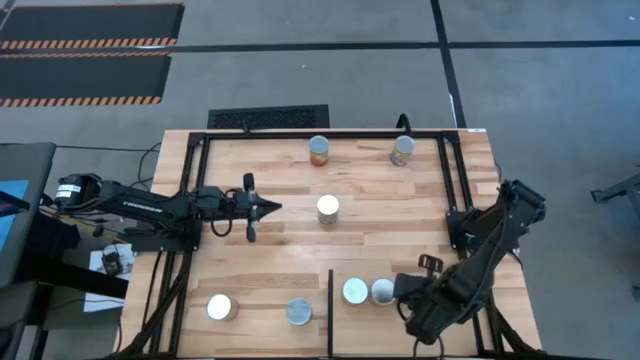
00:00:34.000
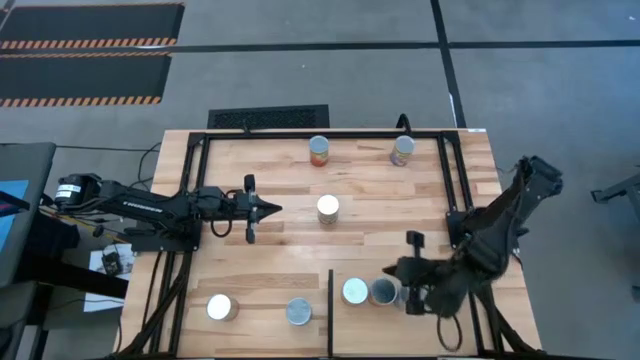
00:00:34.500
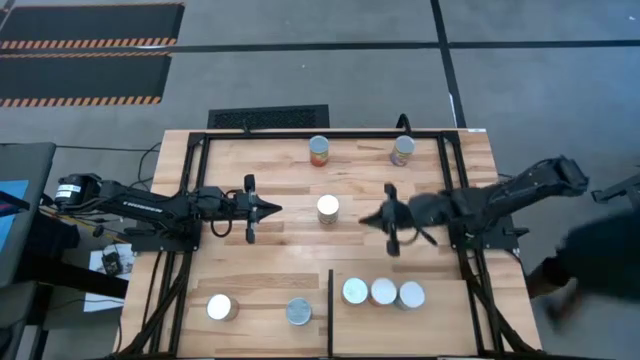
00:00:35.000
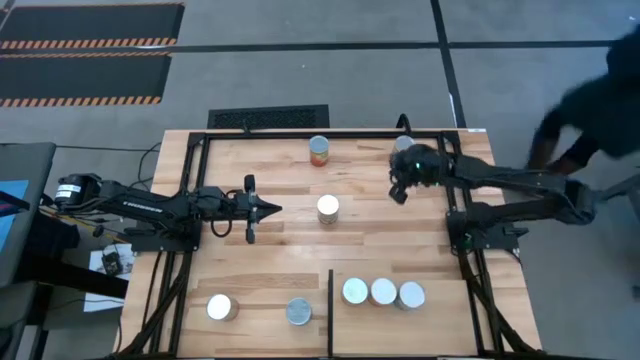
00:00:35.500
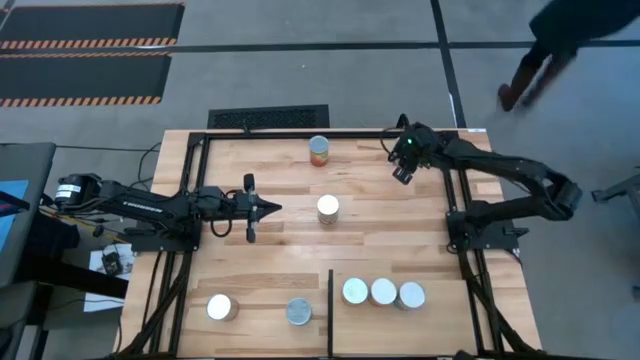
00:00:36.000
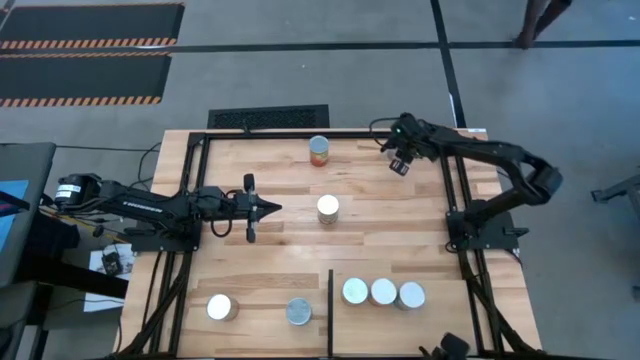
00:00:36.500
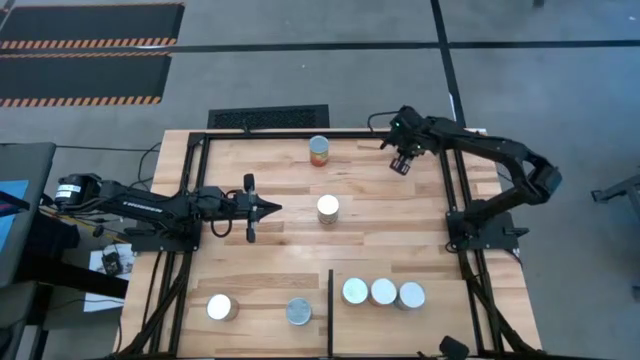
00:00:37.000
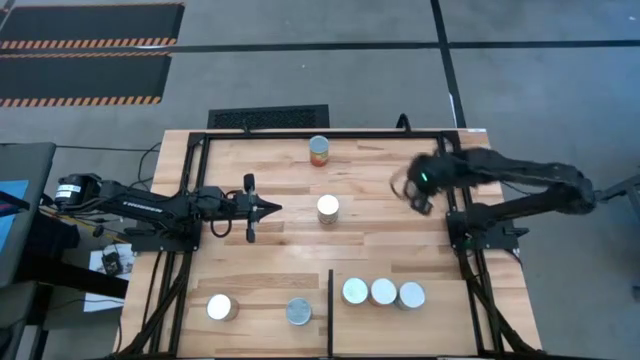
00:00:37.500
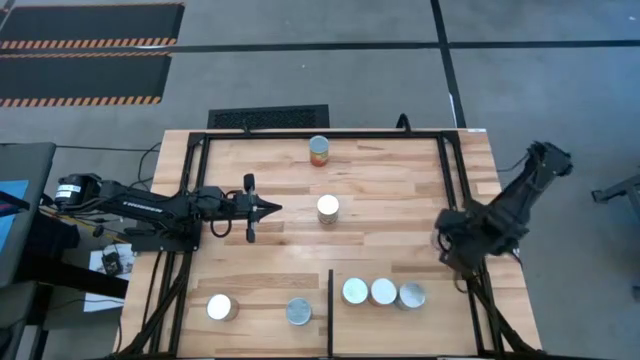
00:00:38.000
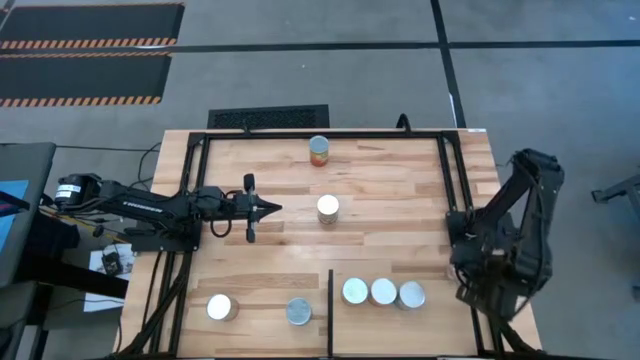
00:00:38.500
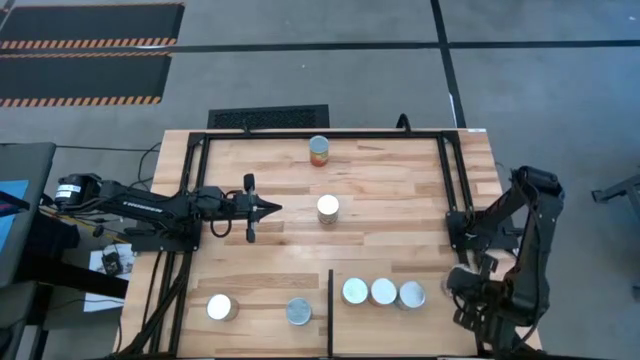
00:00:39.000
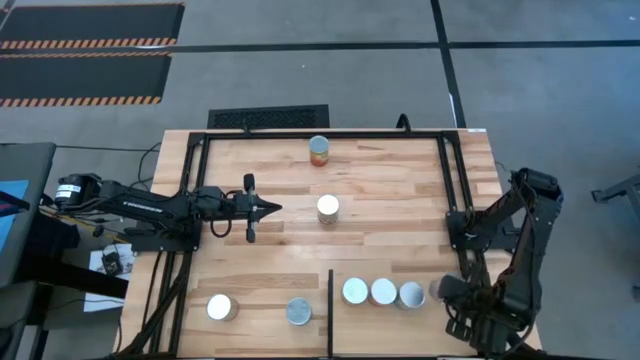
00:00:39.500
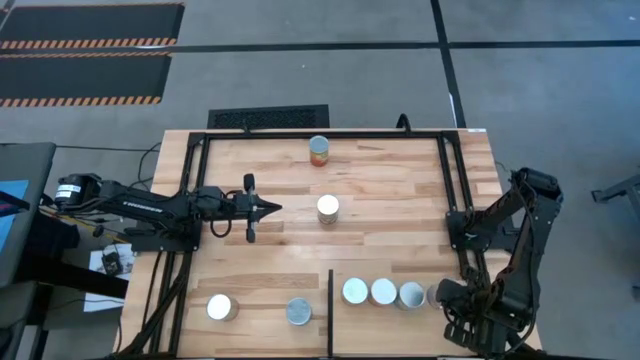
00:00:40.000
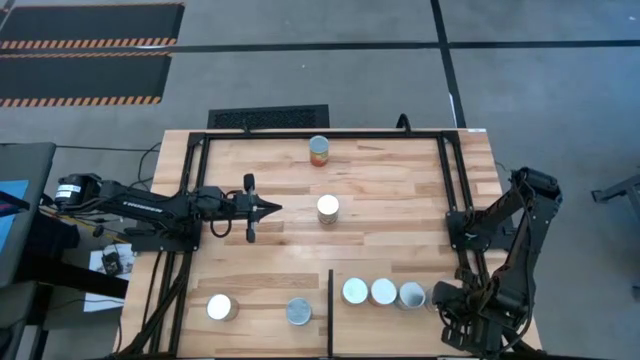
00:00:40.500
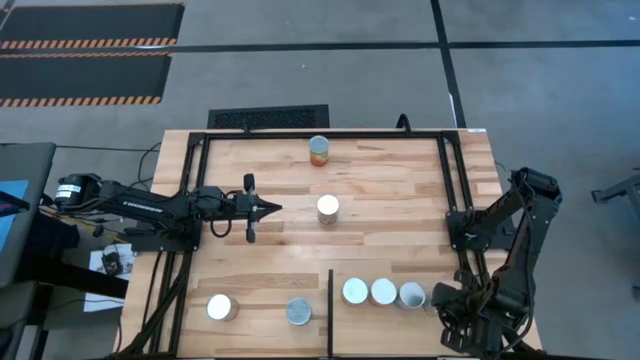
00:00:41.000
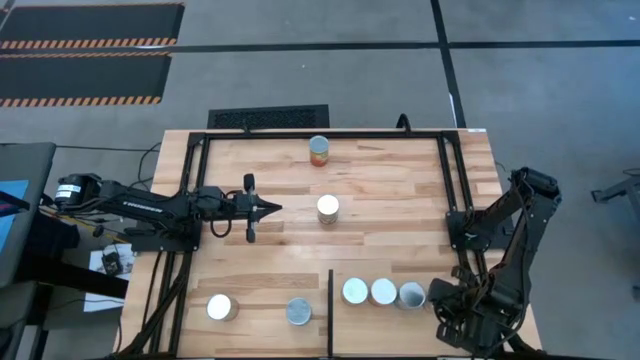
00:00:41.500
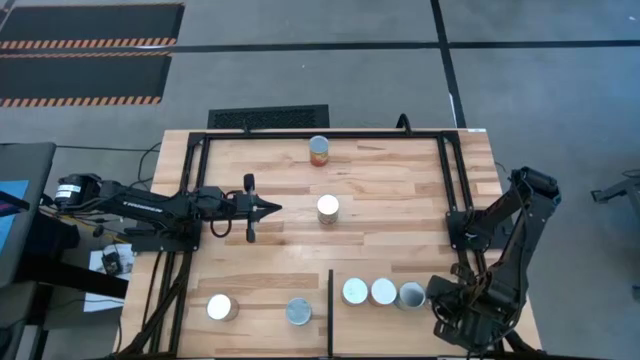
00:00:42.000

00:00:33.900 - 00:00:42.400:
Task: Pick and place cans onto a shelf
Put the top canned peaches on the shelf

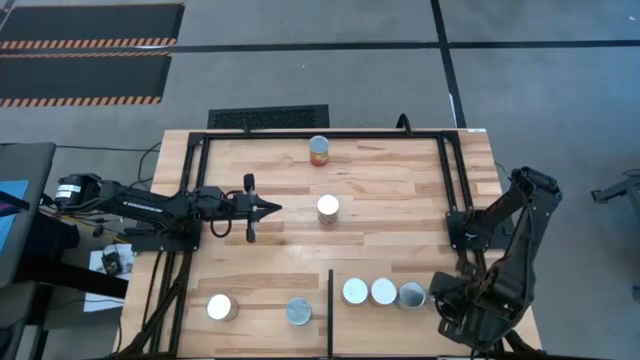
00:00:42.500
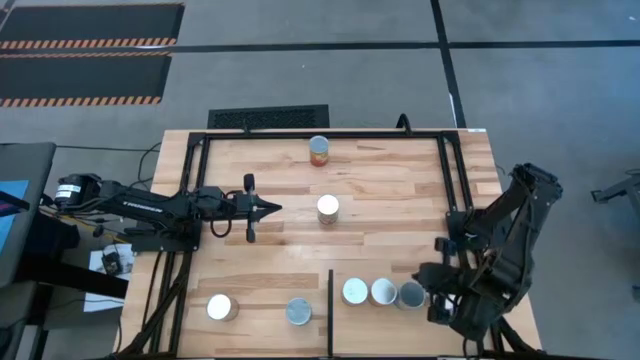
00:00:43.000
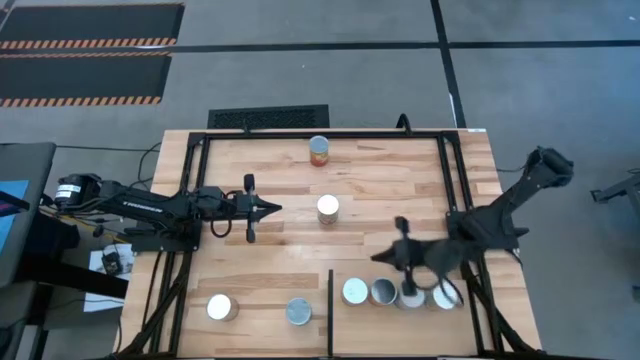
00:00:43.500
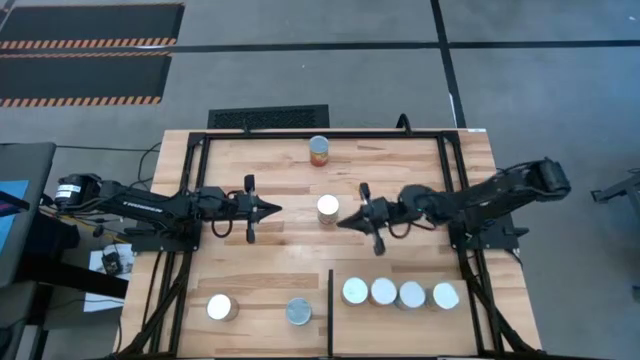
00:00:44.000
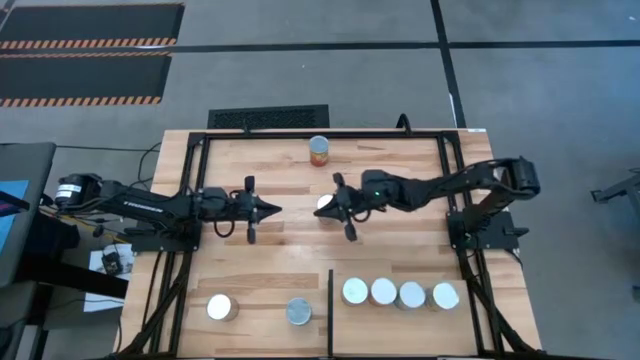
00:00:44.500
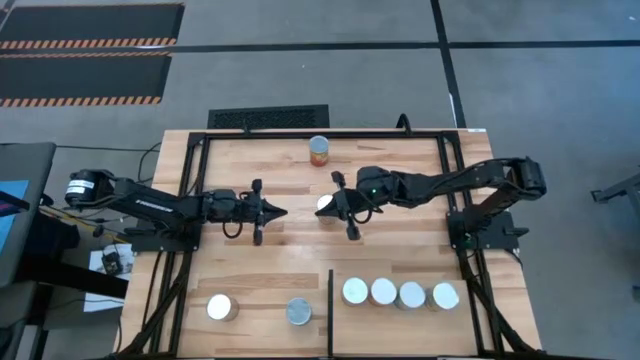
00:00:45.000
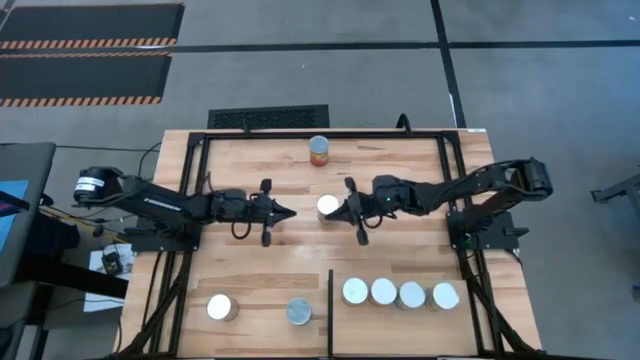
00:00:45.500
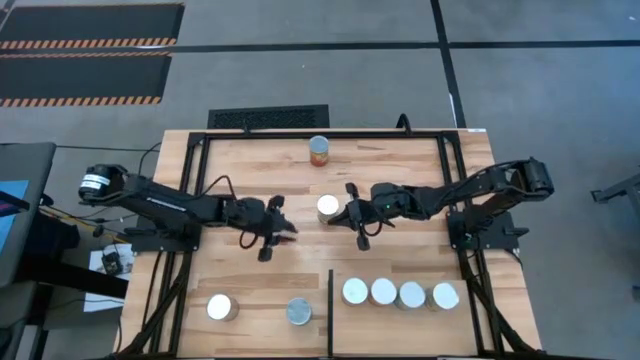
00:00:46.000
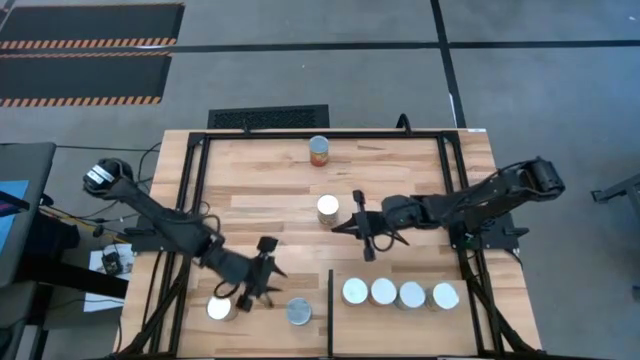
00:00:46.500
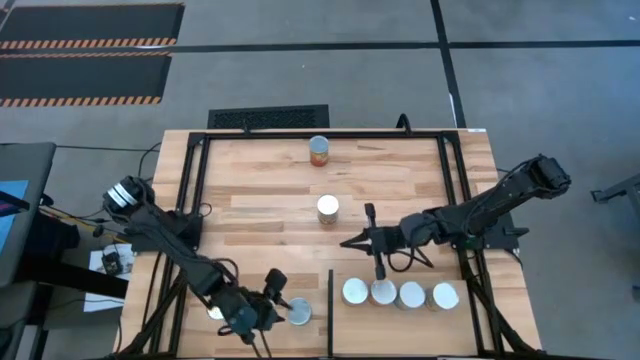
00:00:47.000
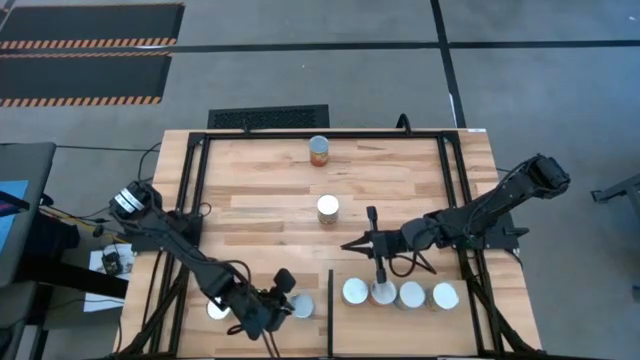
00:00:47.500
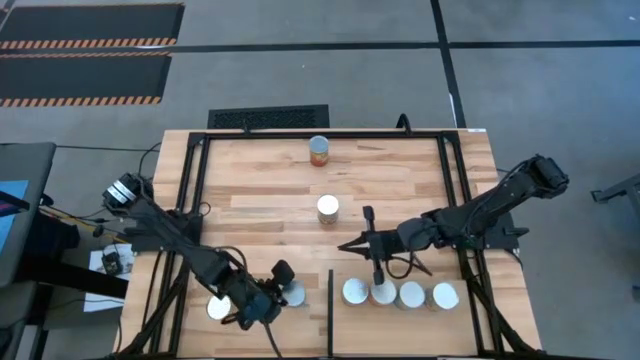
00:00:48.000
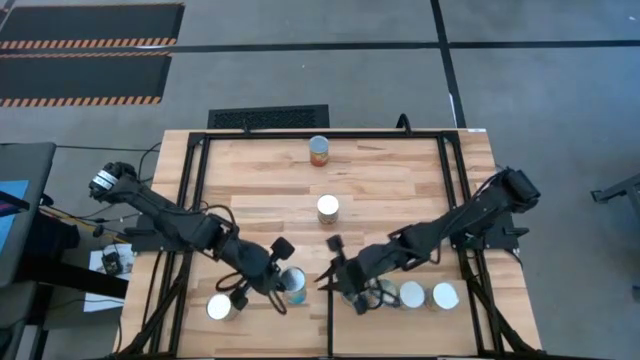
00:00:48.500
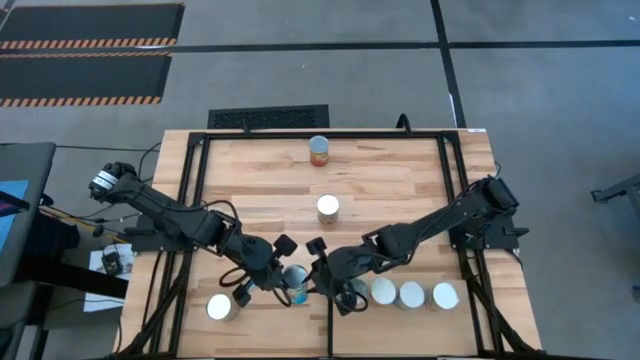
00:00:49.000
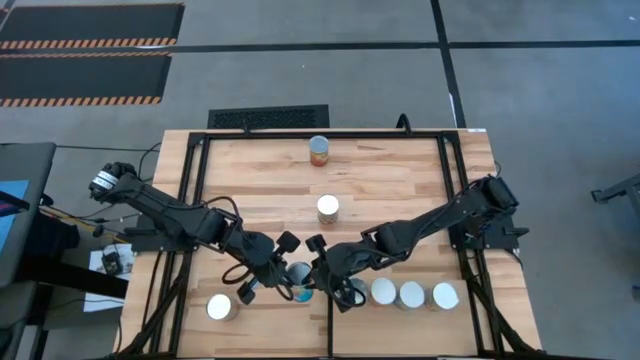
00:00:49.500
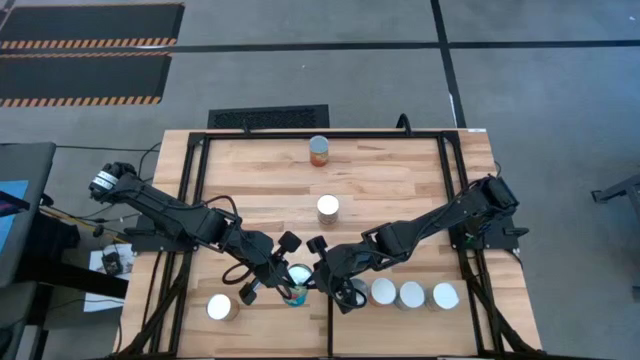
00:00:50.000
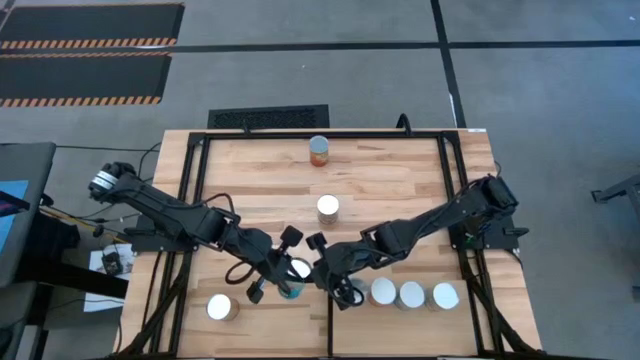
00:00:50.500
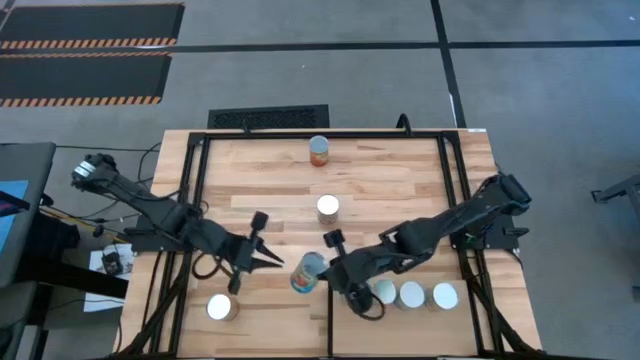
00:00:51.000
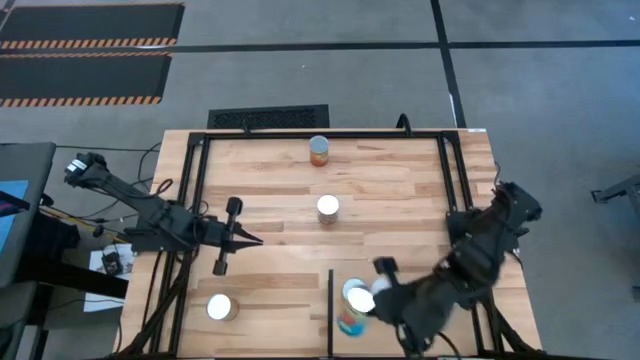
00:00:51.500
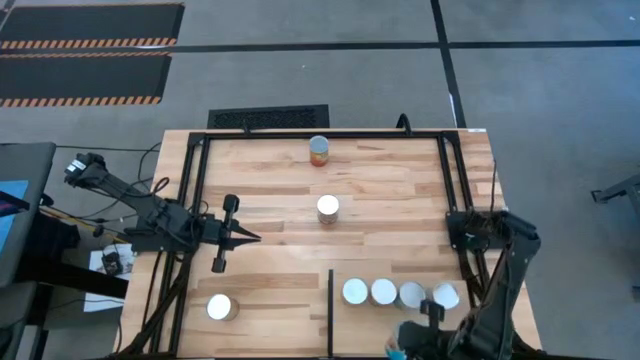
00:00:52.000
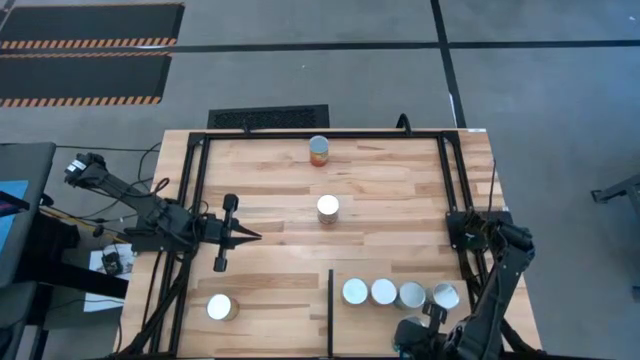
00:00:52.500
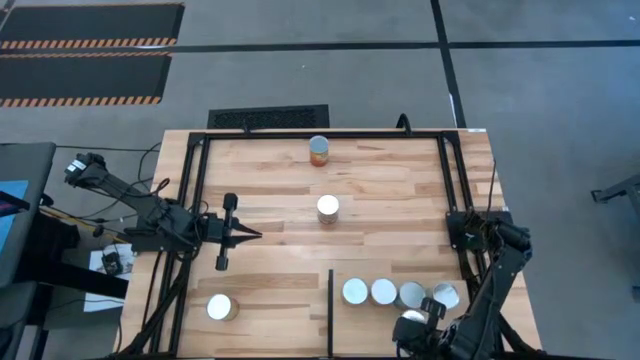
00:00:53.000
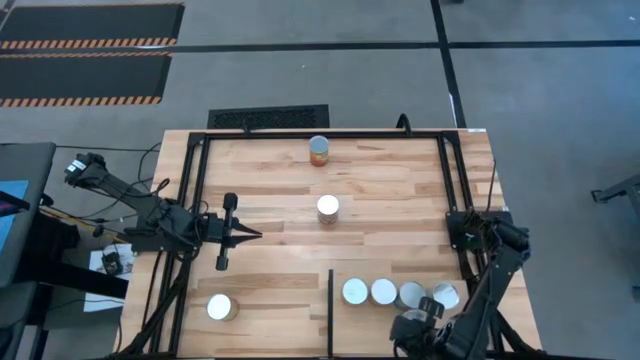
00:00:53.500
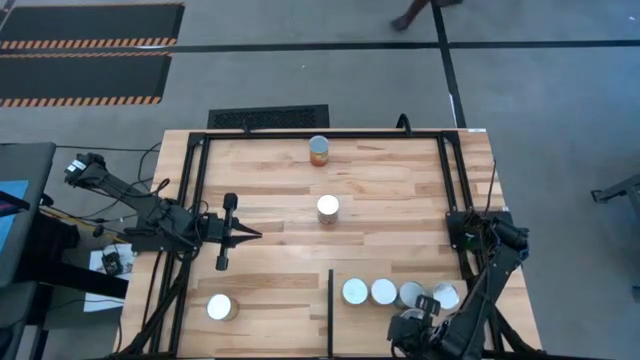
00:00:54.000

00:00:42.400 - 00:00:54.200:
Put the canned tomatoes on the shelf aligned with the other canned tomatoes
